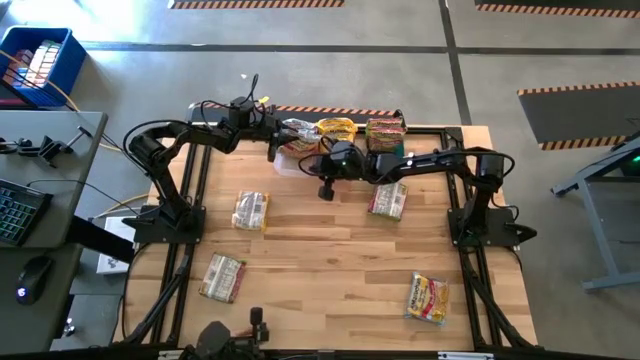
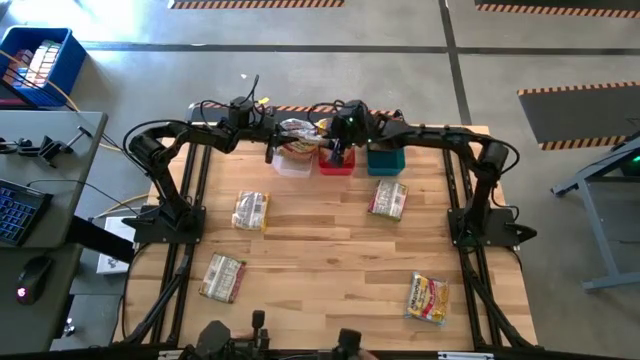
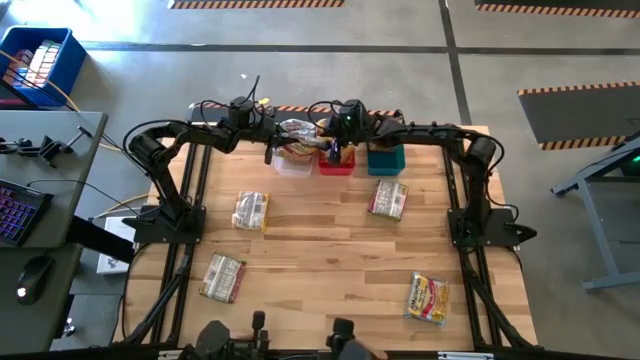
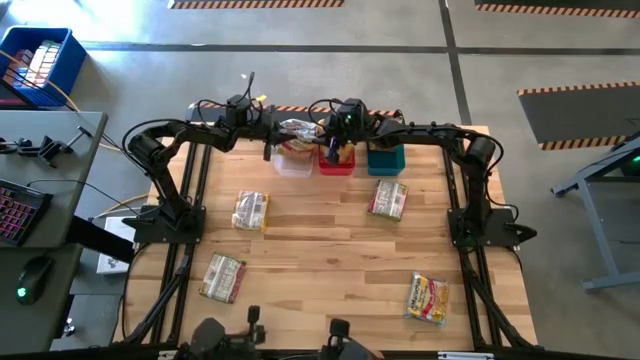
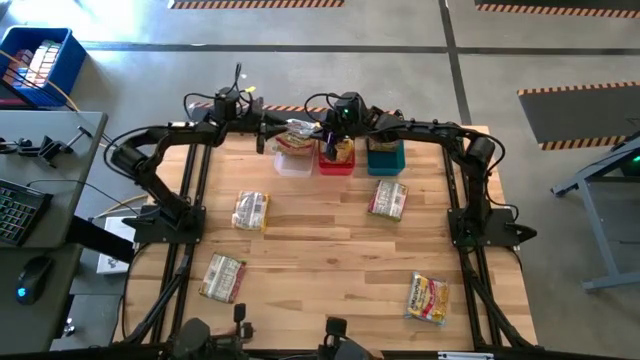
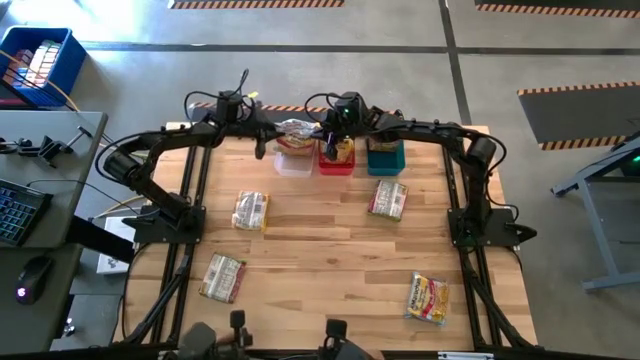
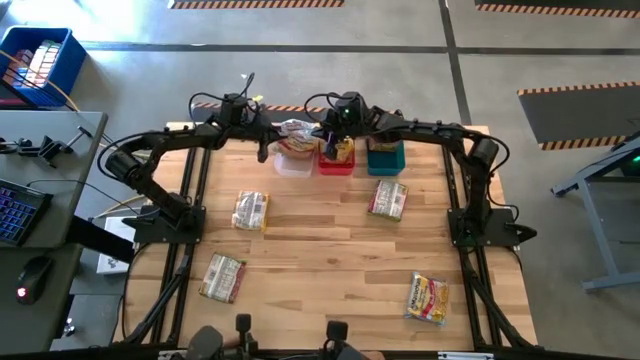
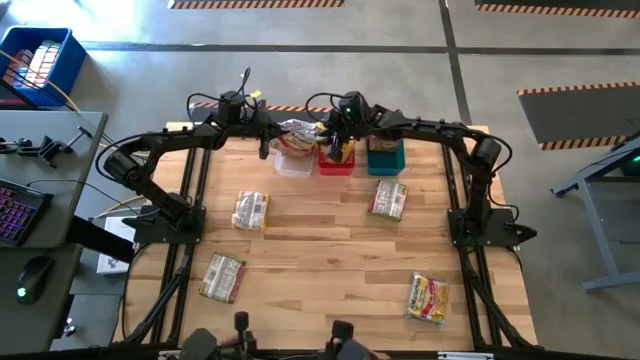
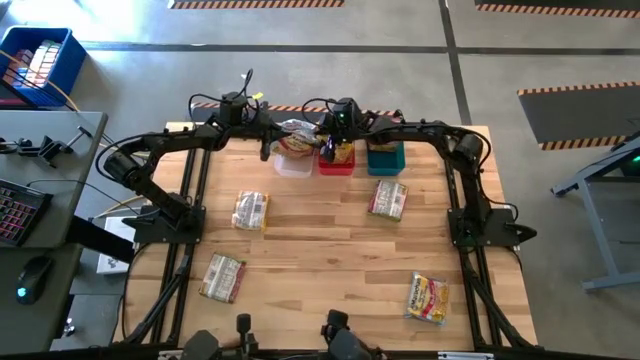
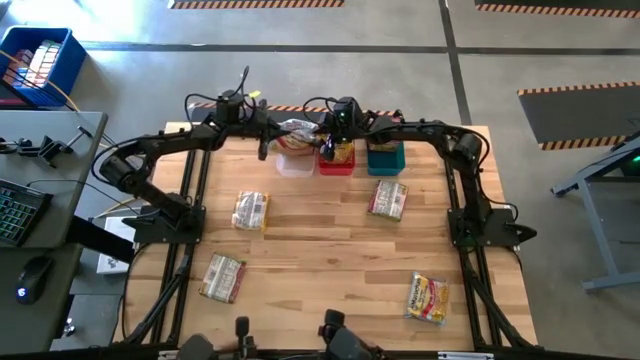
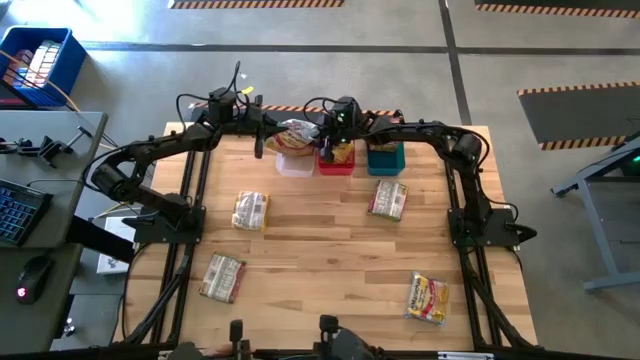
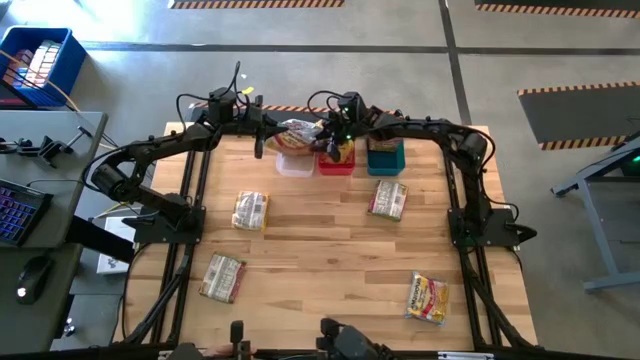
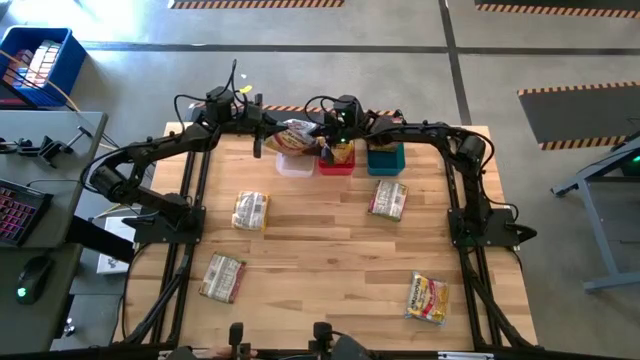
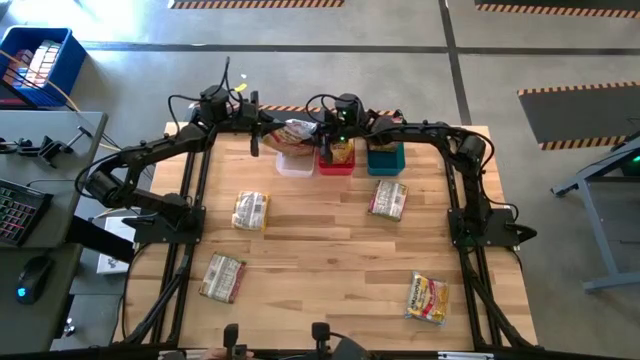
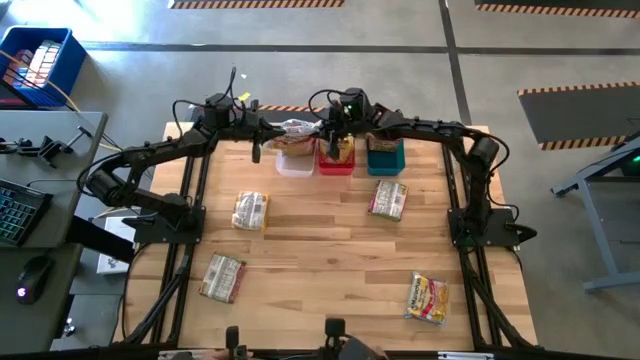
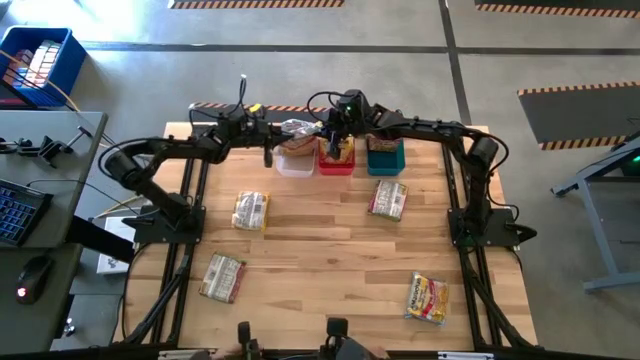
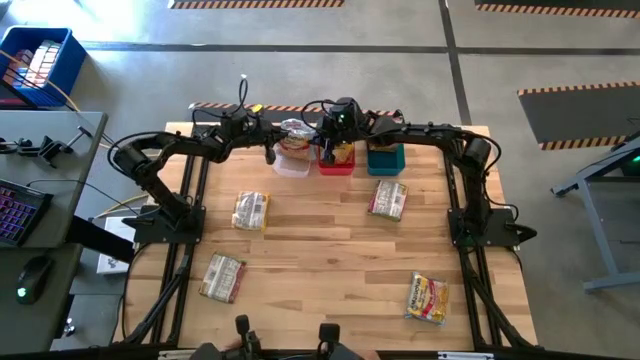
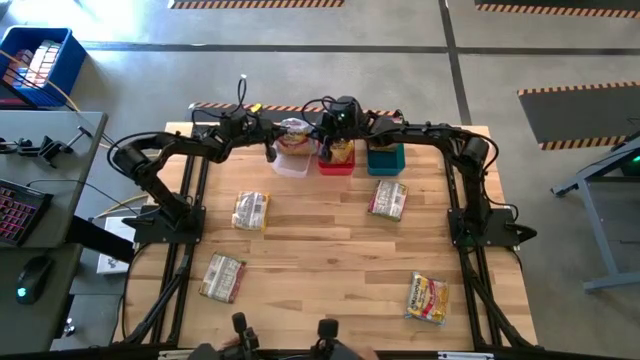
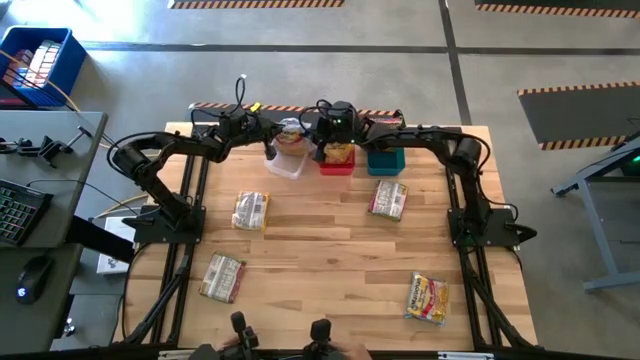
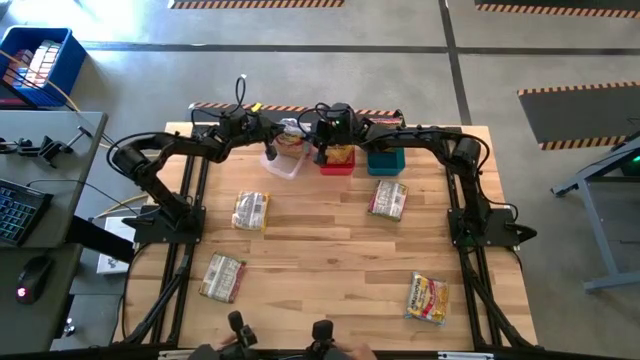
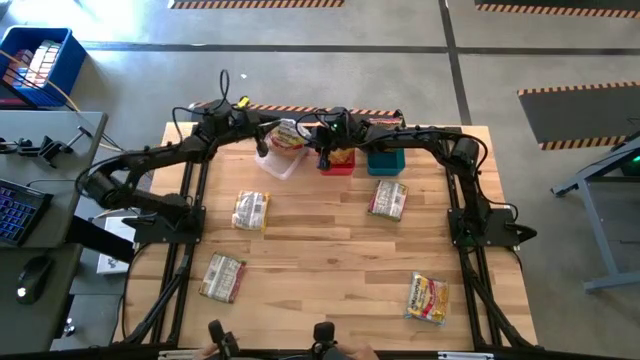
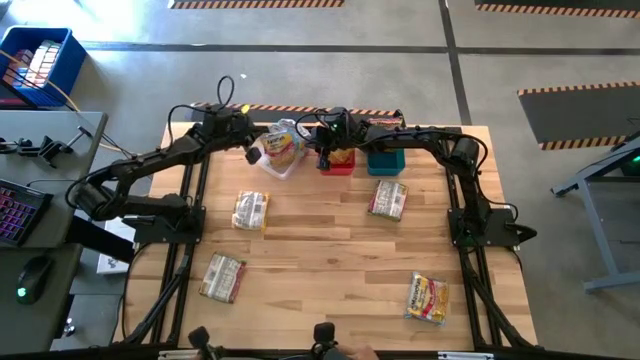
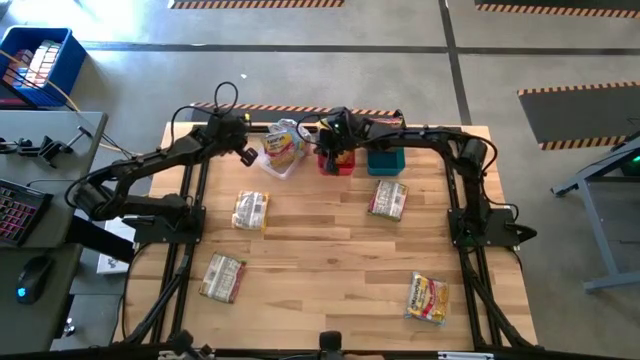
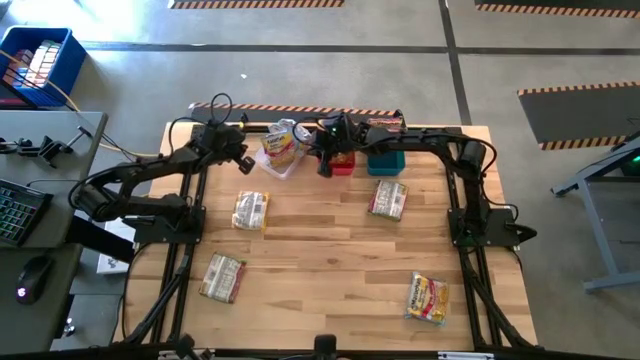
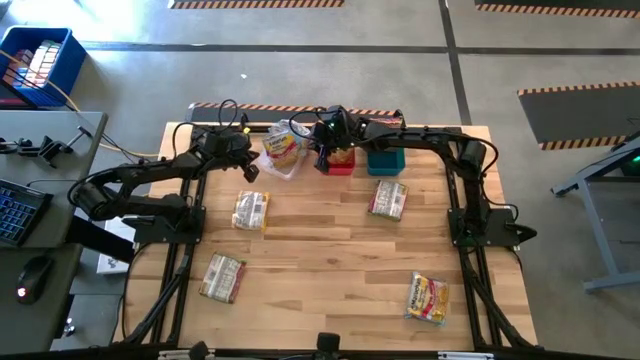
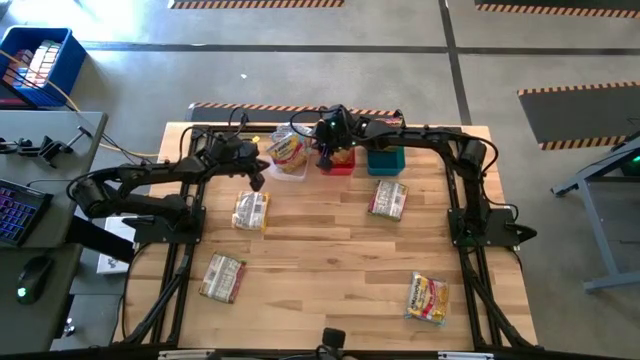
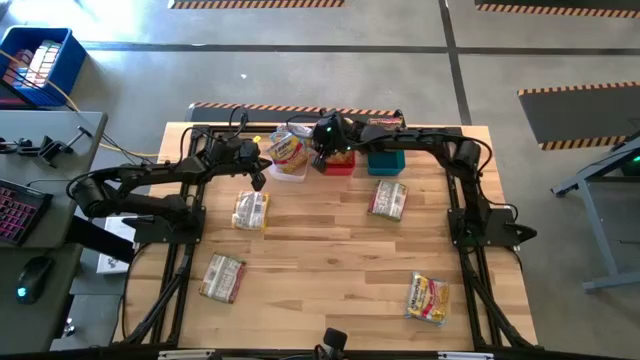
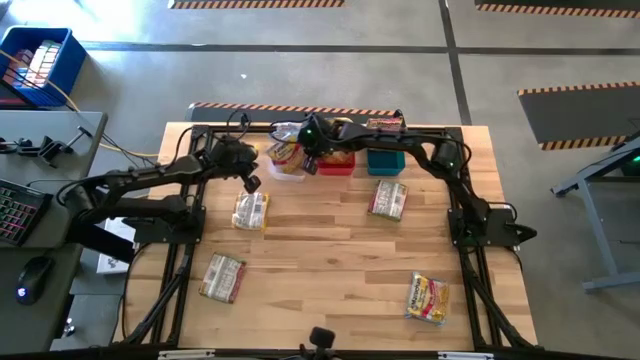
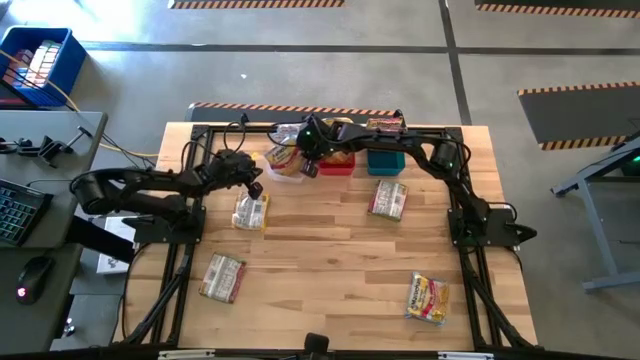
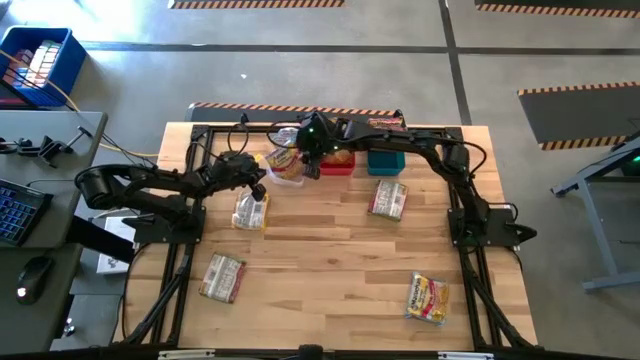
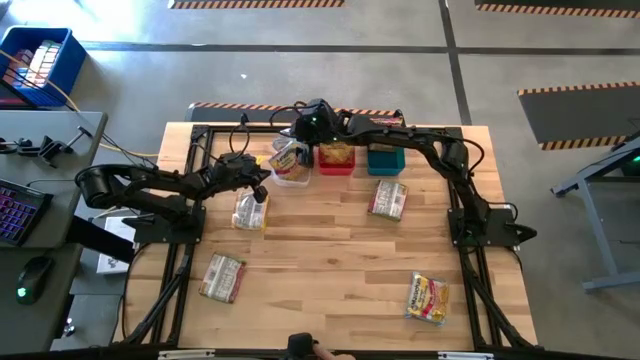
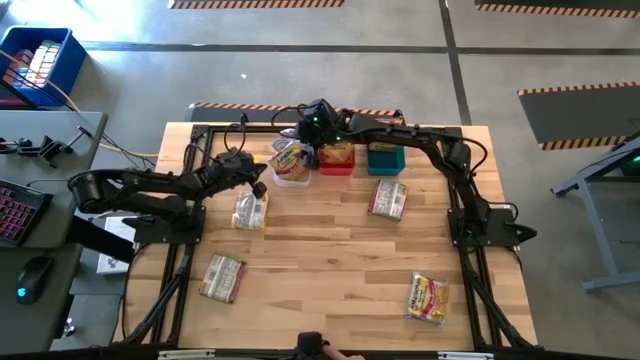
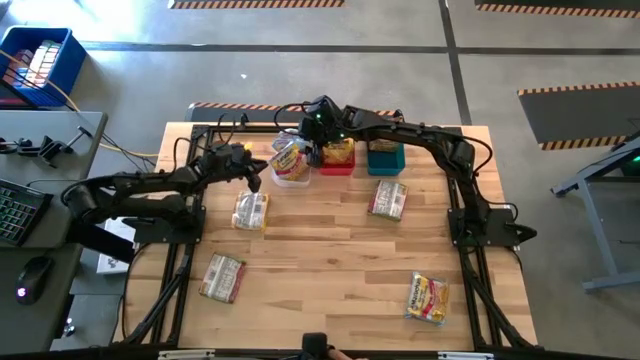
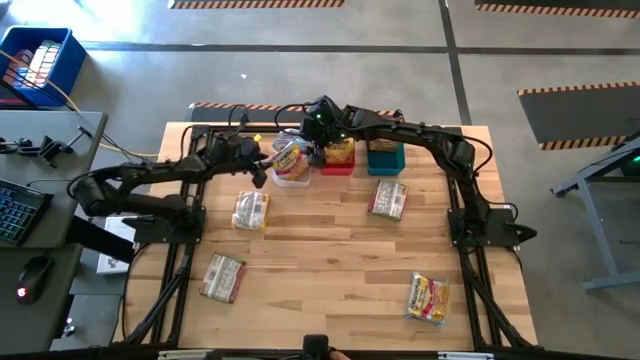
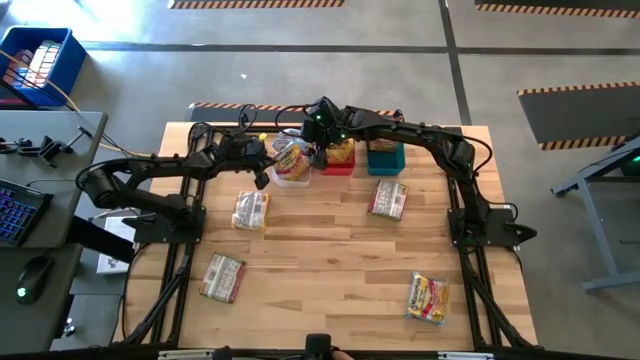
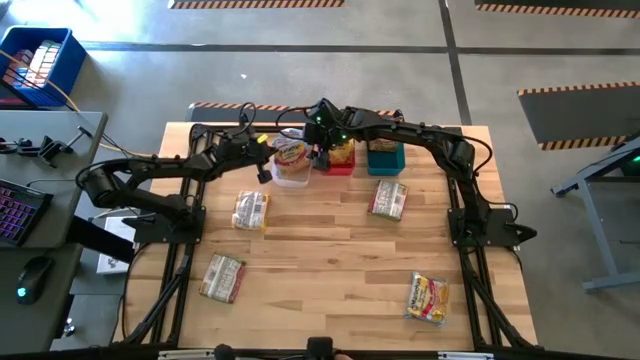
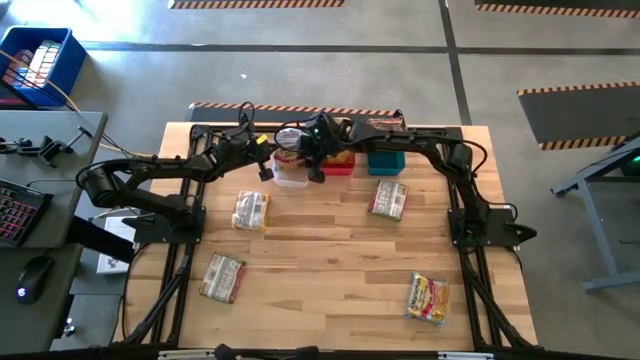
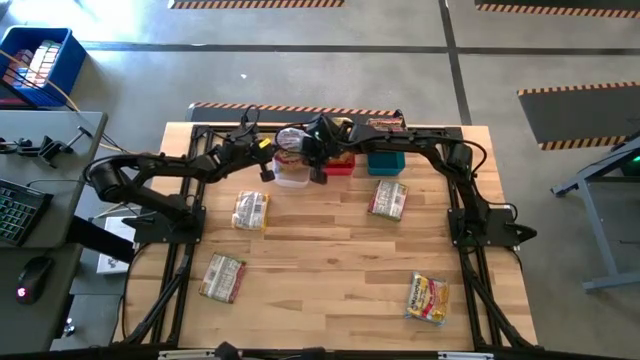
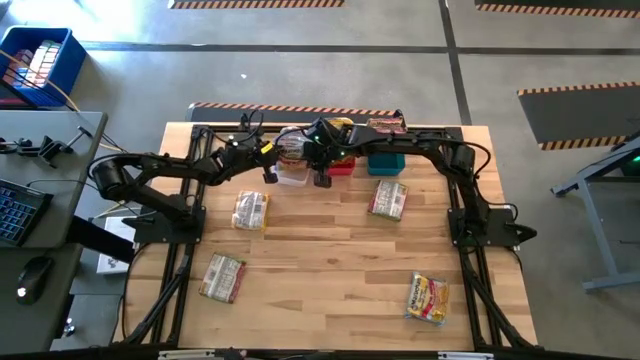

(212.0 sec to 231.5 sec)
Task: Sort Maruchan noodles
Put the blue noodle pack into the transparent bin

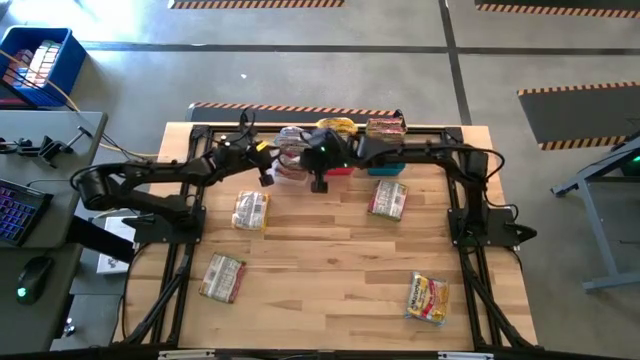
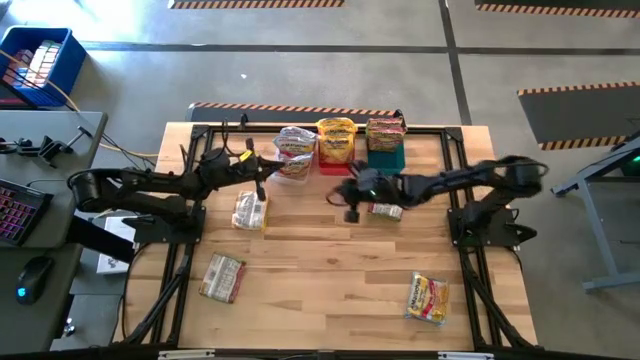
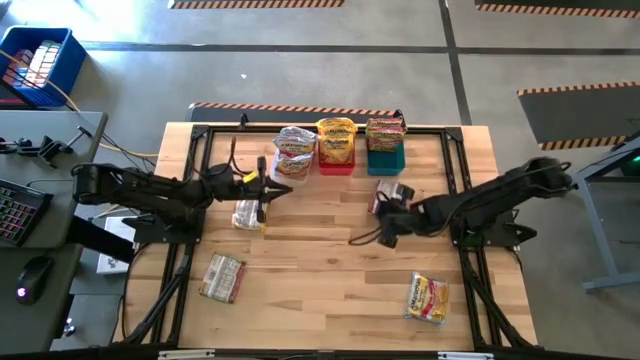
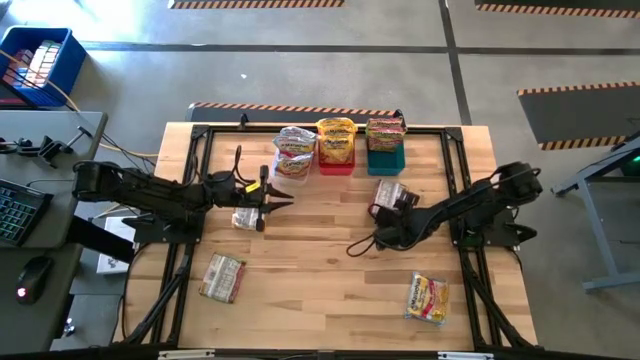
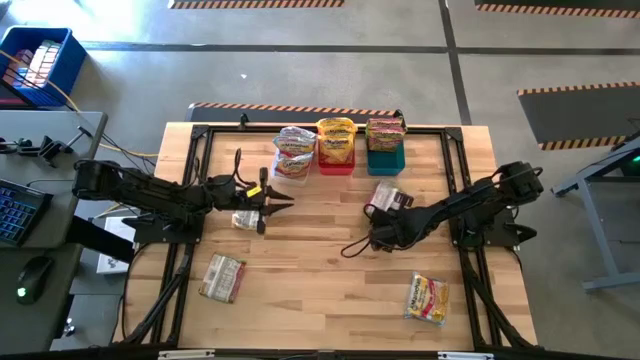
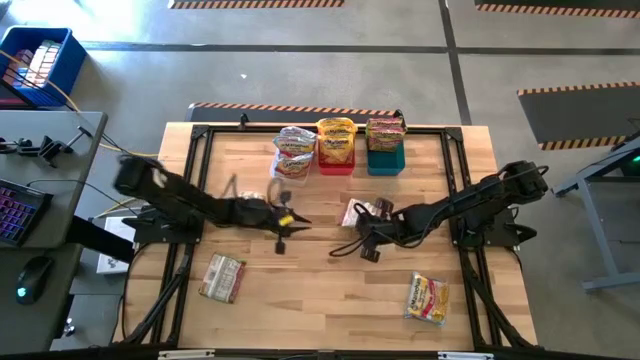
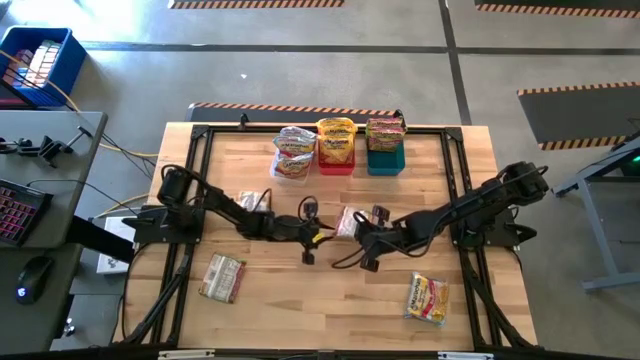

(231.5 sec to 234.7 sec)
Put the green noodle pack into the blue bin
